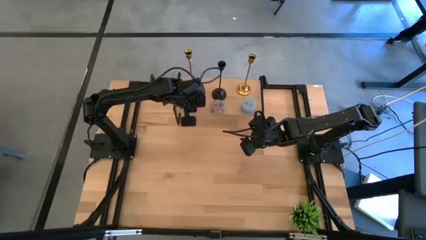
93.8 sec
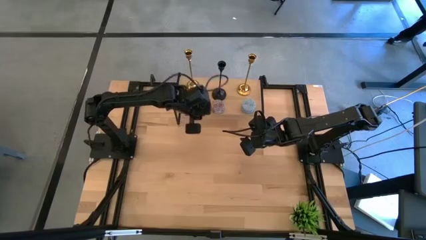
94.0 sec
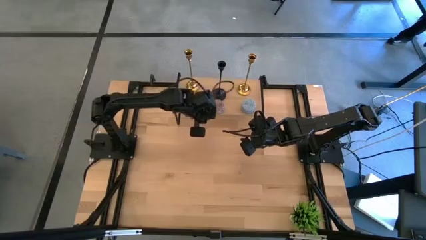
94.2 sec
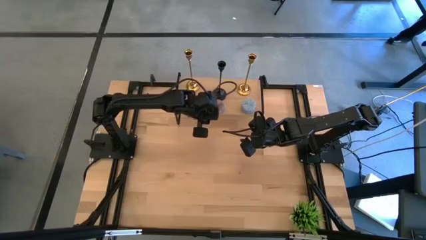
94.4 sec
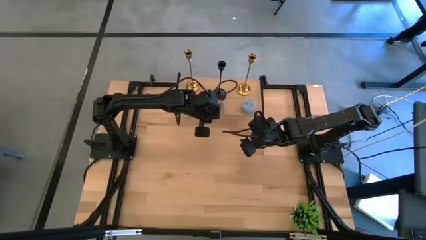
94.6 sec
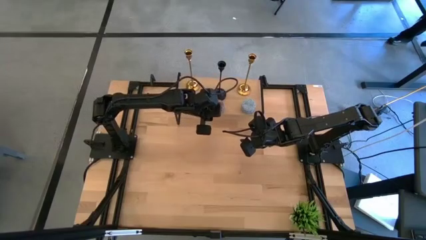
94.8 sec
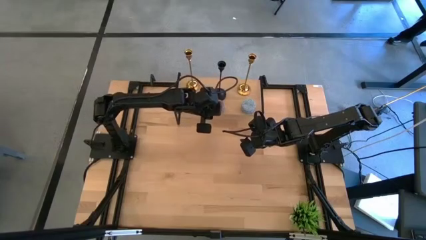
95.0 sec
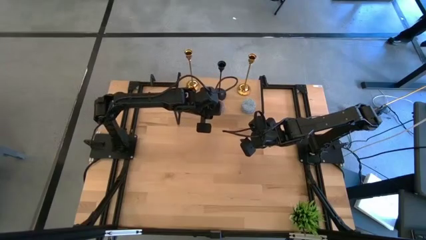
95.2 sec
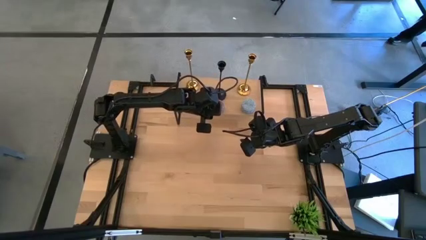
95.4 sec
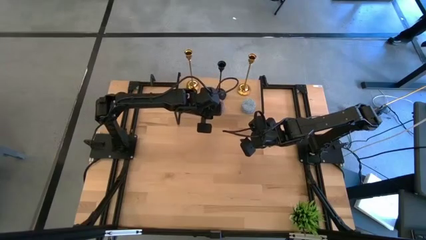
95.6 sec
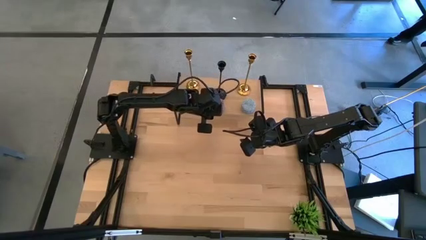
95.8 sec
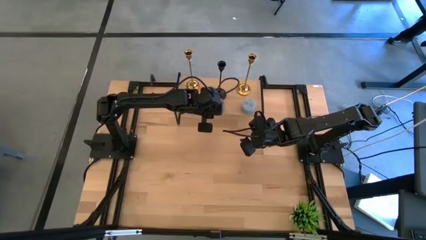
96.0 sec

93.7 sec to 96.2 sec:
Task: Pick & Place candle stick holders
Adjust the red candle

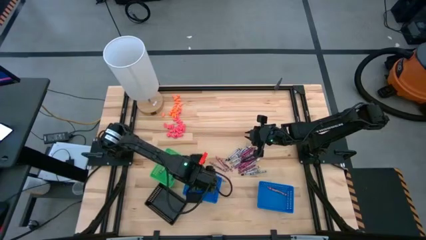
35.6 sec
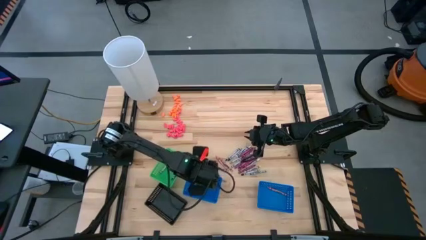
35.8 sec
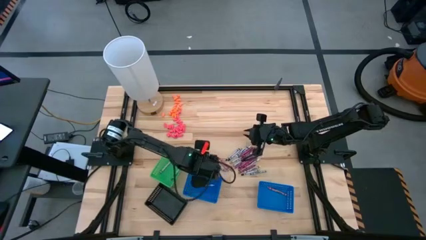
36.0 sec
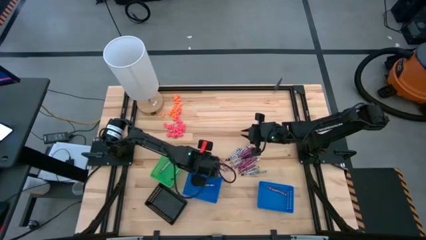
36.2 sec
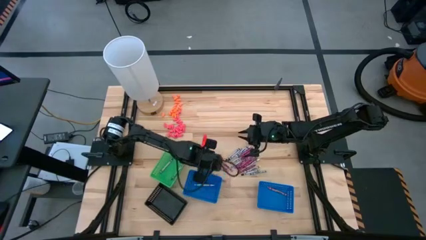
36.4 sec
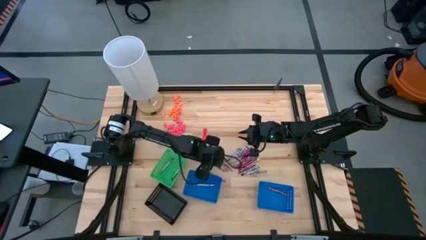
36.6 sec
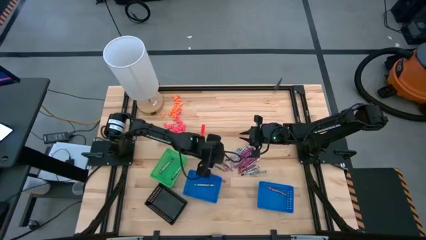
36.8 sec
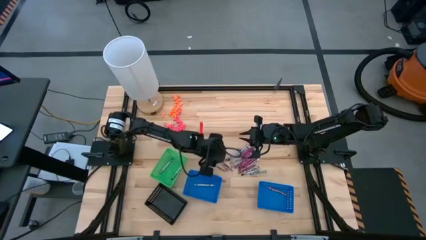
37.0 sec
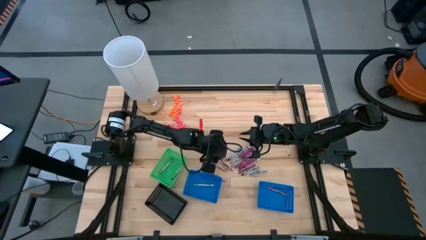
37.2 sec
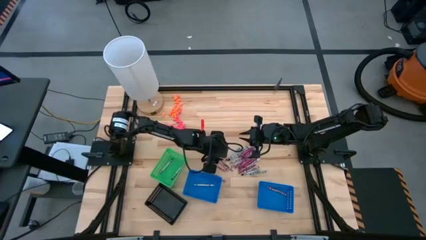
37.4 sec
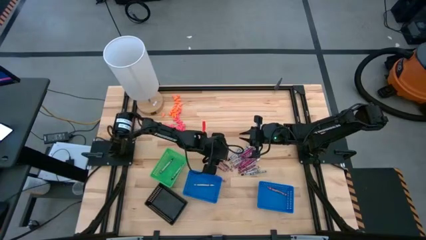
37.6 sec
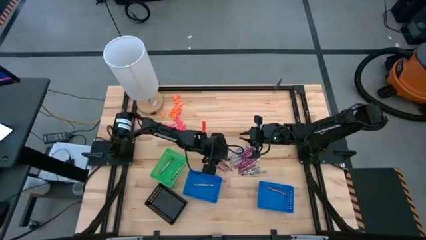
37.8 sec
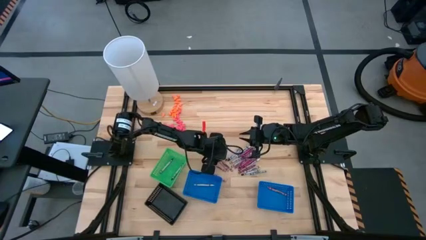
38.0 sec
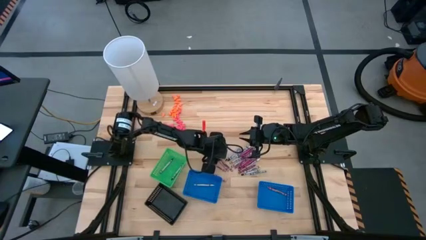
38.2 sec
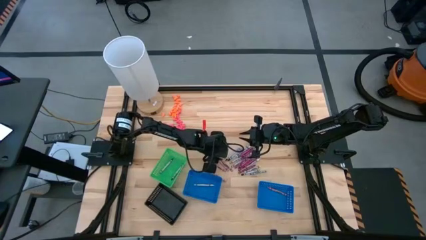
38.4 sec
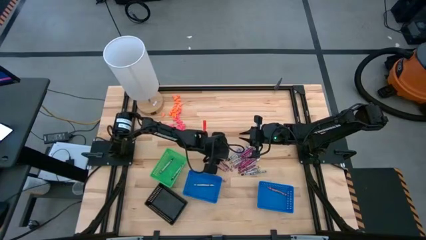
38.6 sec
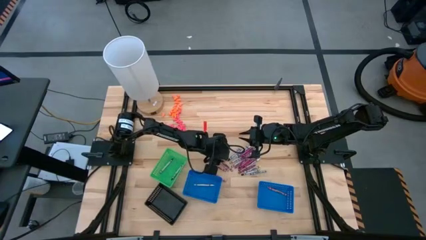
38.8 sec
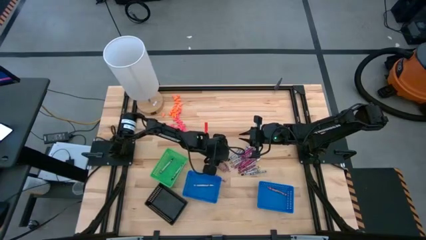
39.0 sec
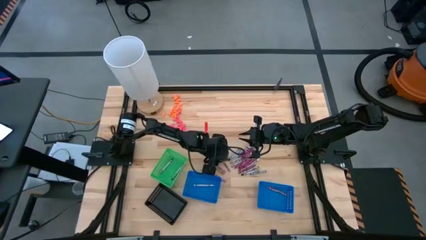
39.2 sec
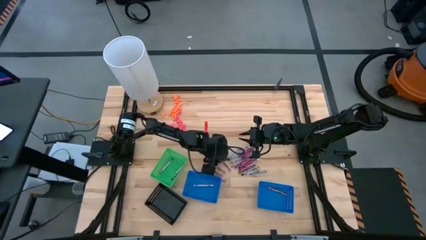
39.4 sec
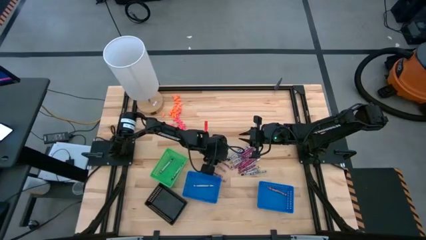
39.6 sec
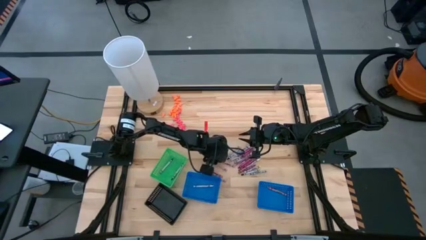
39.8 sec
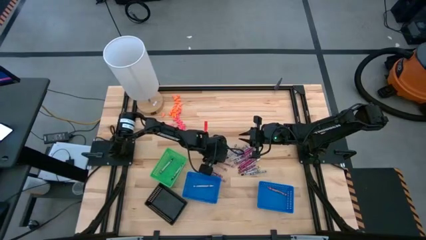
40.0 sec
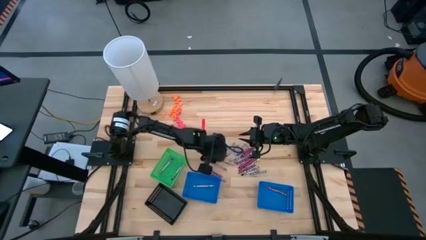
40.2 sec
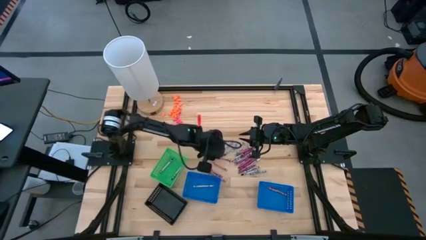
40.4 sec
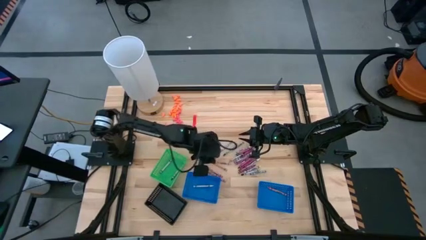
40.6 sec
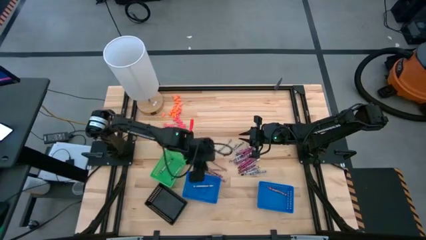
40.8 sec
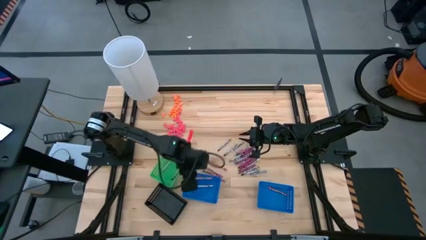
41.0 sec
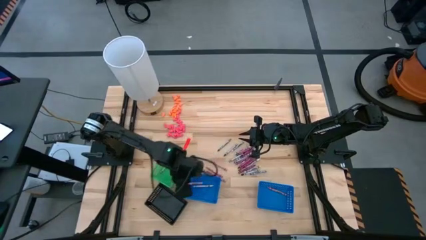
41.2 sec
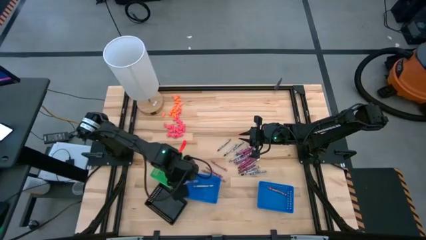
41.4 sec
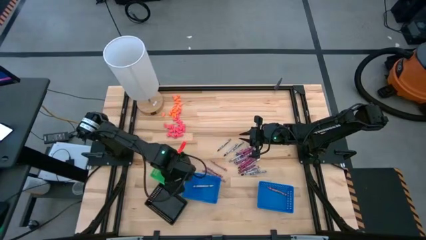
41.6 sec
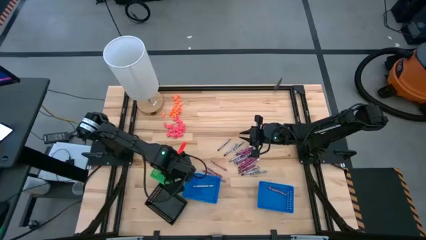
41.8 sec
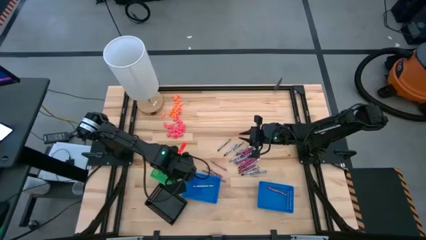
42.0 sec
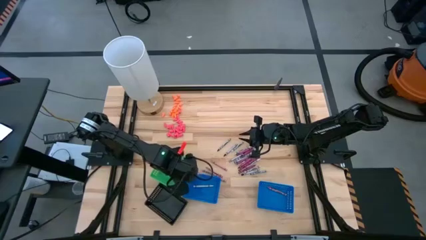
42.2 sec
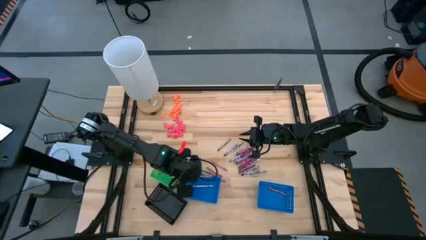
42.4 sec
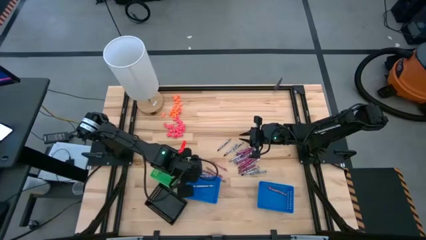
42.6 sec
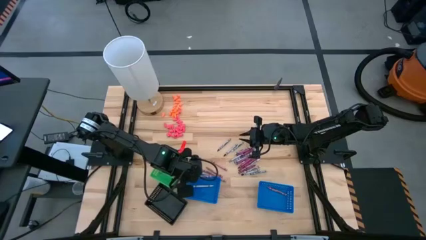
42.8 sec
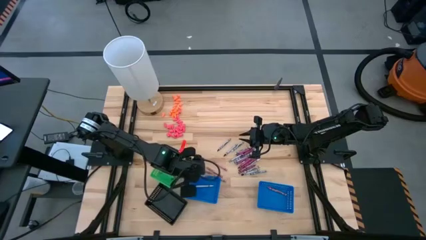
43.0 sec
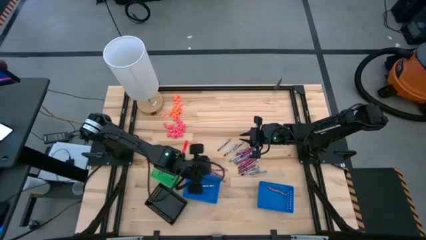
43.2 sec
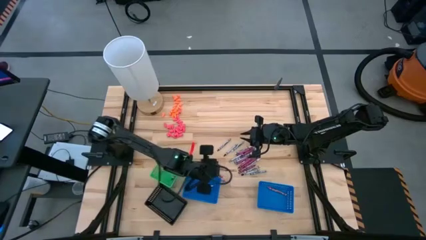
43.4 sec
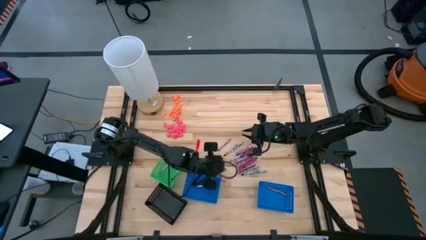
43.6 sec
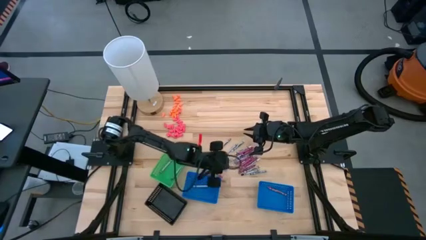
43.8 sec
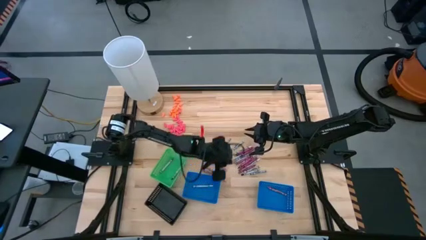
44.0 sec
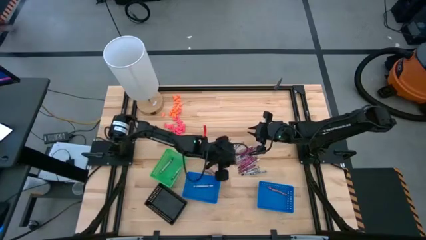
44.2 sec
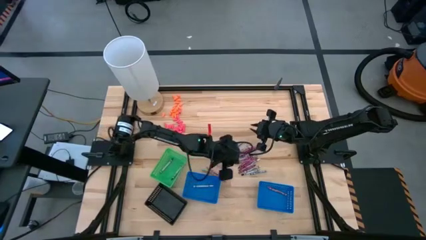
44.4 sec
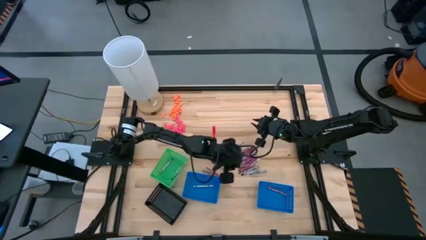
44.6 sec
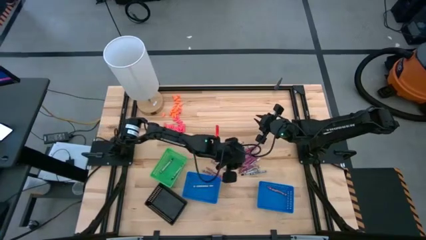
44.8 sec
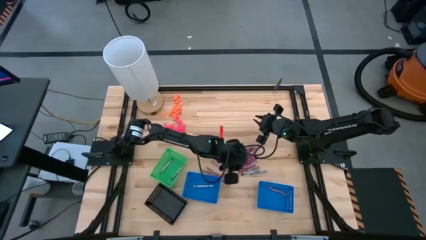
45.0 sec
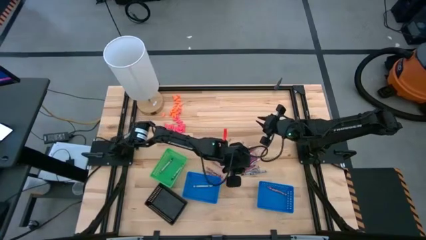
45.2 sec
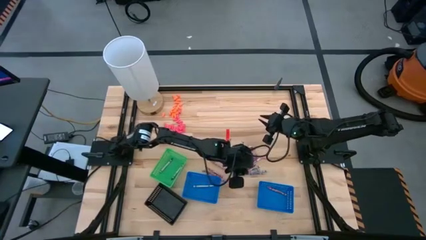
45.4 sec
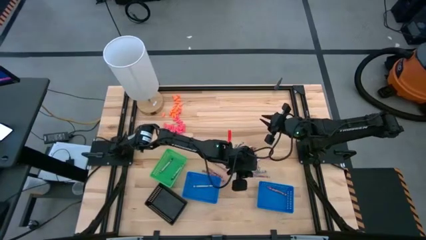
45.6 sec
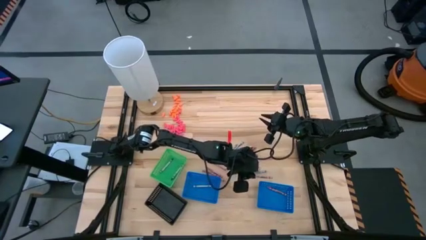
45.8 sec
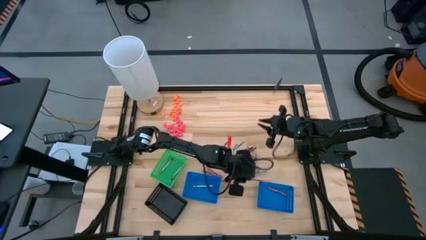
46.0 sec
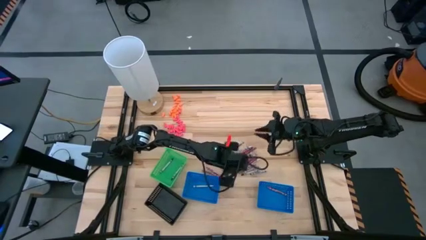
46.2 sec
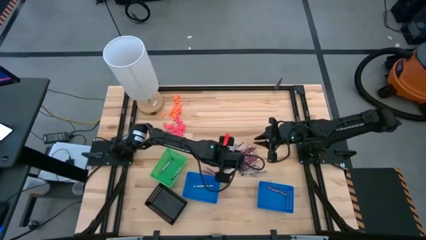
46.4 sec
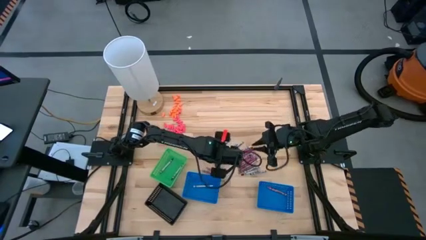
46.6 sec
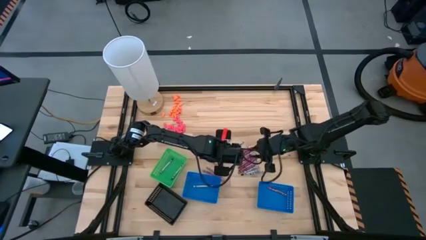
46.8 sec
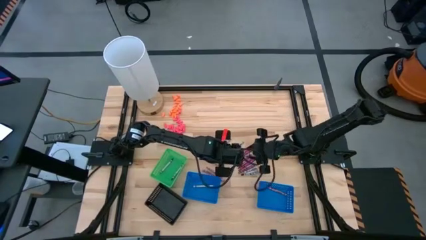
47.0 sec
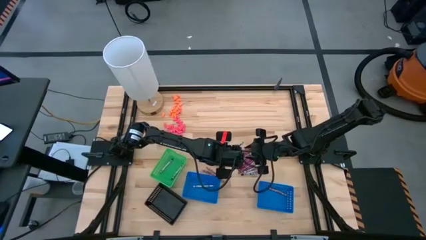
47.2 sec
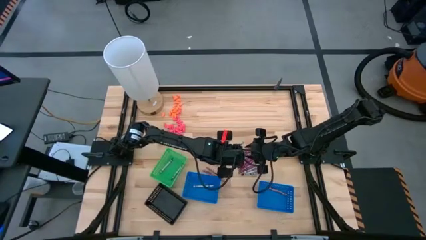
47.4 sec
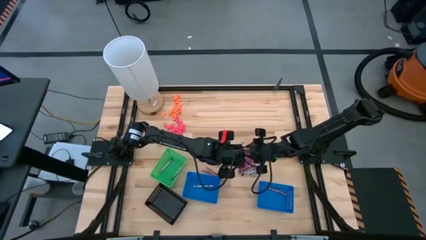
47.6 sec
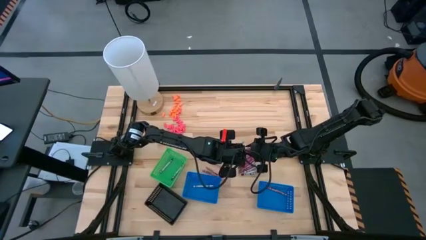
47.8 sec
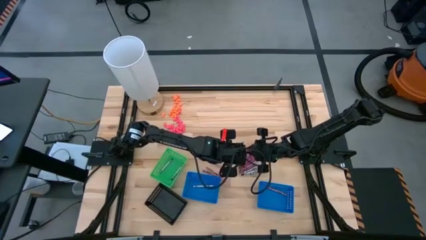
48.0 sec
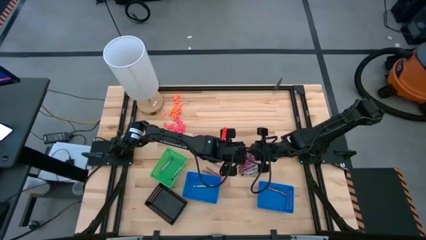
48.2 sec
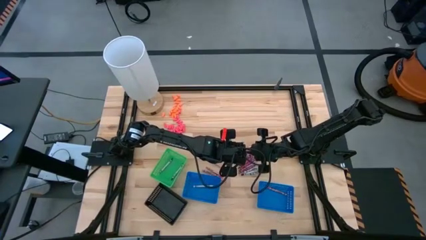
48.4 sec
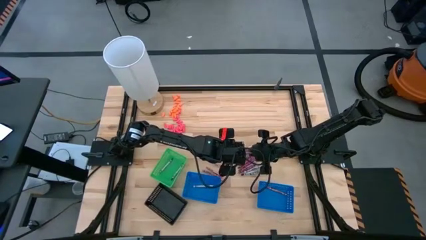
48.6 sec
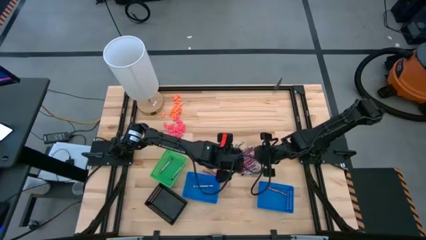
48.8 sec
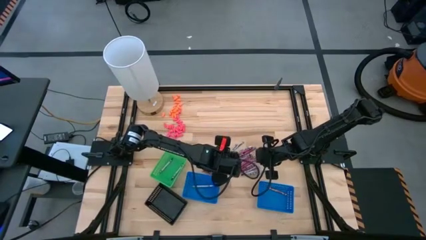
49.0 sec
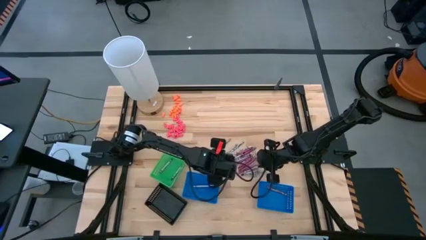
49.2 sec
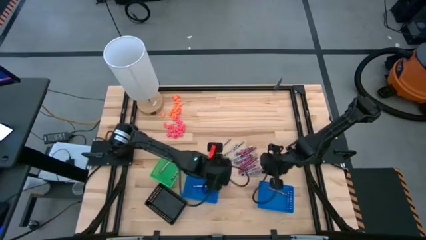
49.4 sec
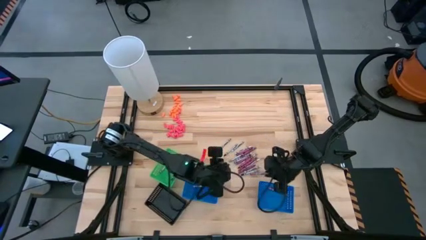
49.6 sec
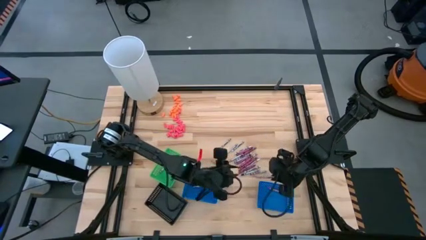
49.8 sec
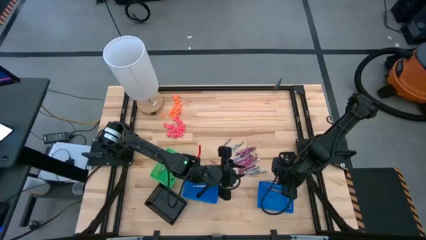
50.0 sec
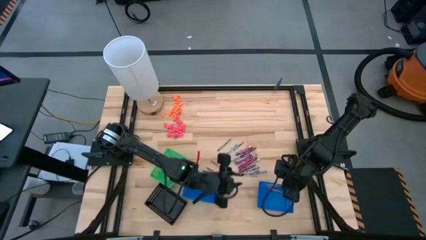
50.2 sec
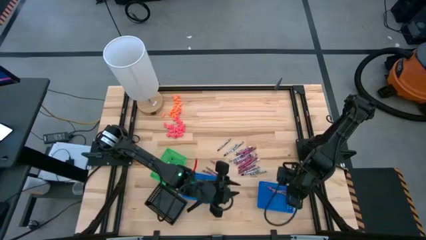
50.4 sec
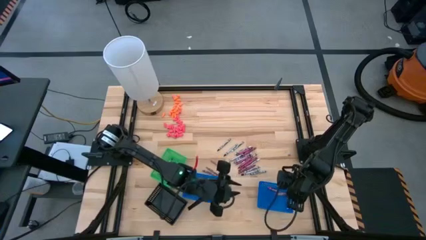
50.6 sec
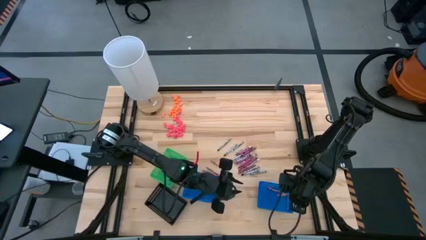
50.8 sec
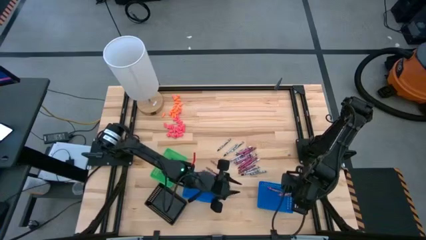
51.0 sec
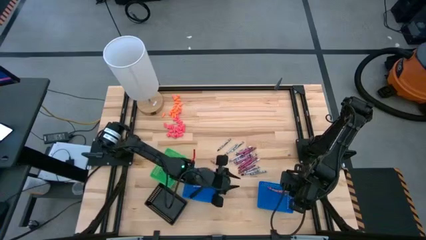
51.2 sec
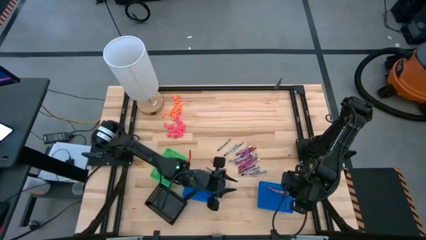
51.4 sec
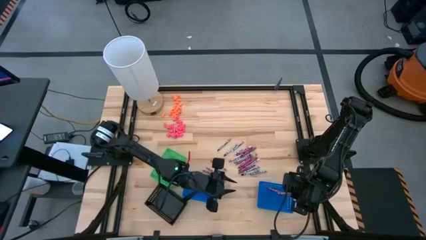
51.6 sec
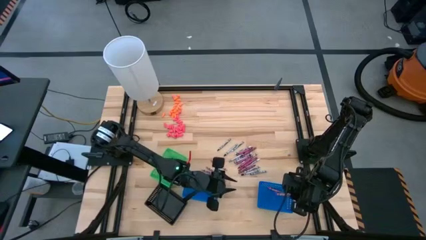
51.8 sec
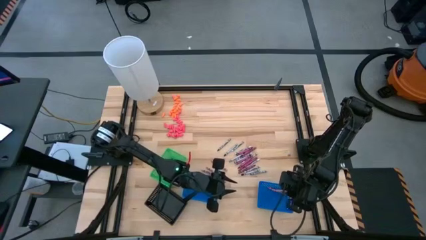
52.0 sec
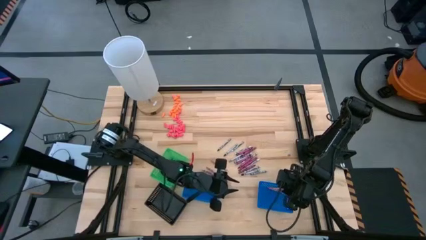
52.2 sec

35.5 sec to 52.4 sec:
Task: Sort crayons
Put the pink crayon into the right blue basket
